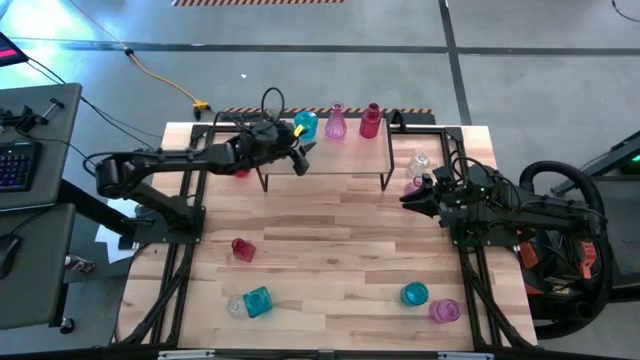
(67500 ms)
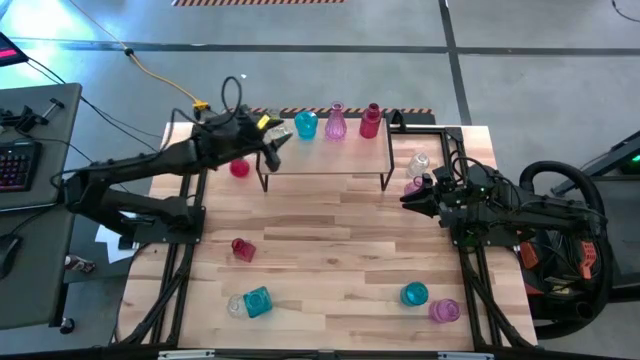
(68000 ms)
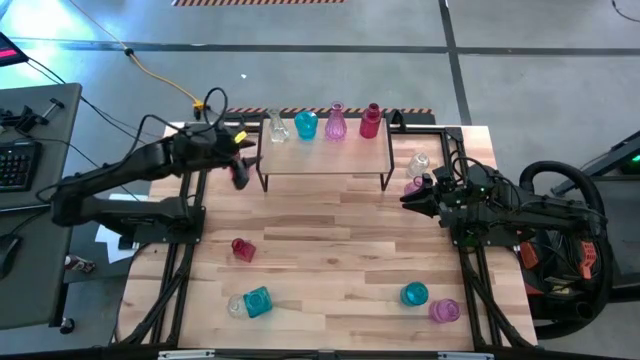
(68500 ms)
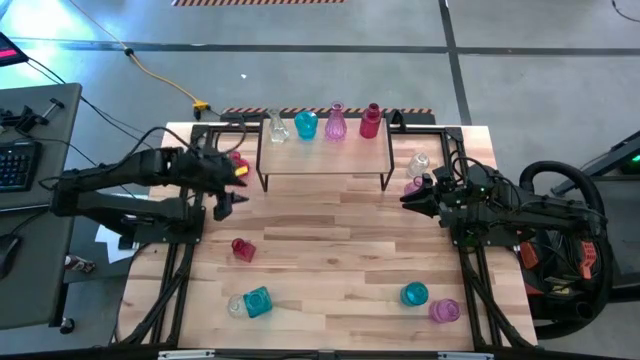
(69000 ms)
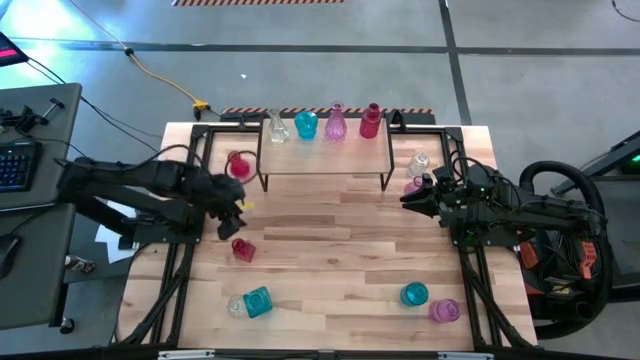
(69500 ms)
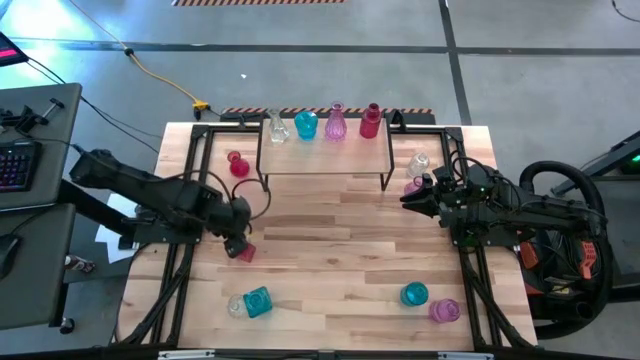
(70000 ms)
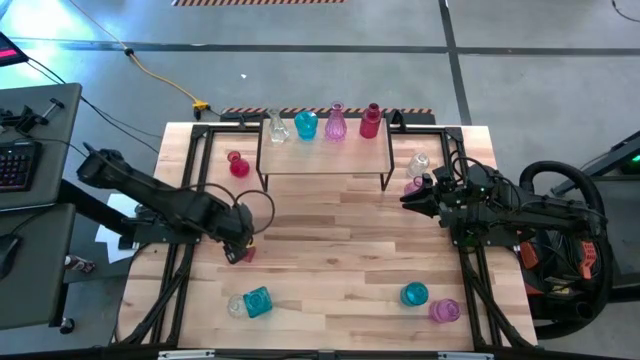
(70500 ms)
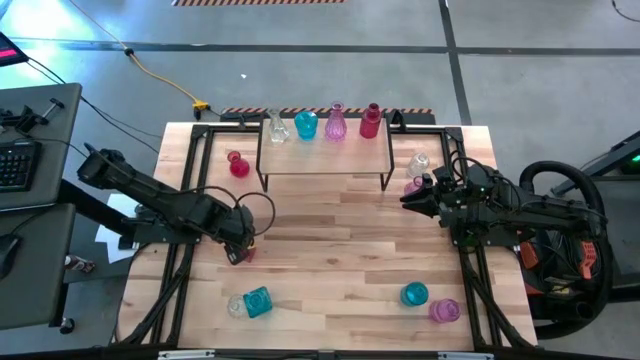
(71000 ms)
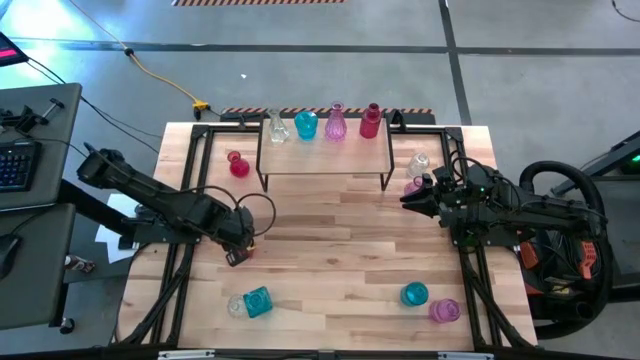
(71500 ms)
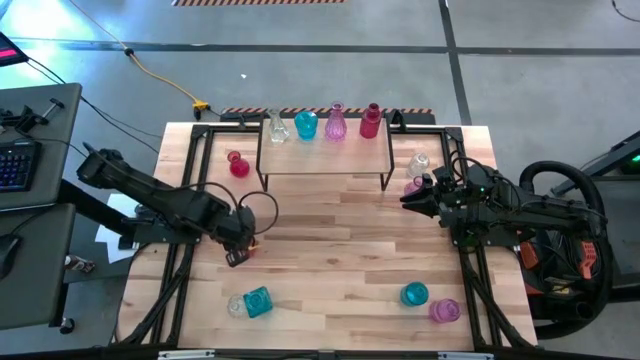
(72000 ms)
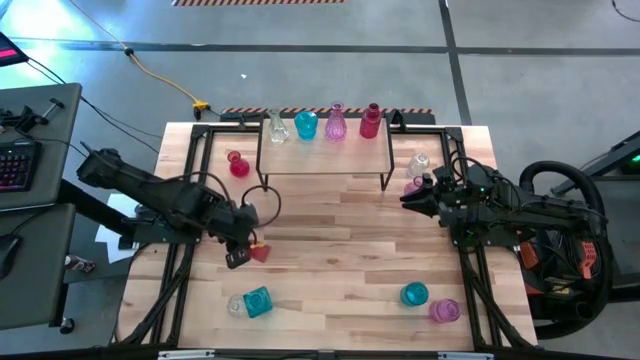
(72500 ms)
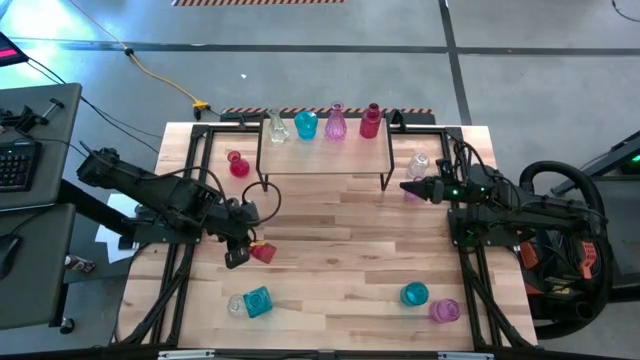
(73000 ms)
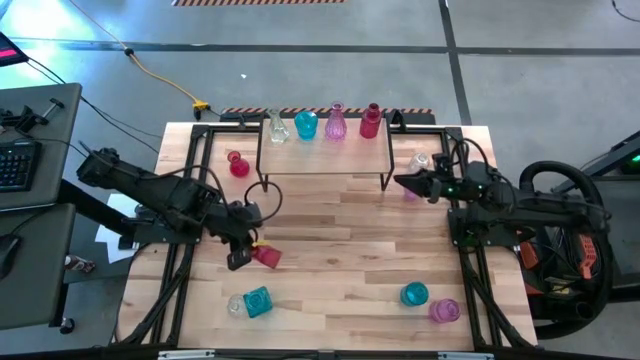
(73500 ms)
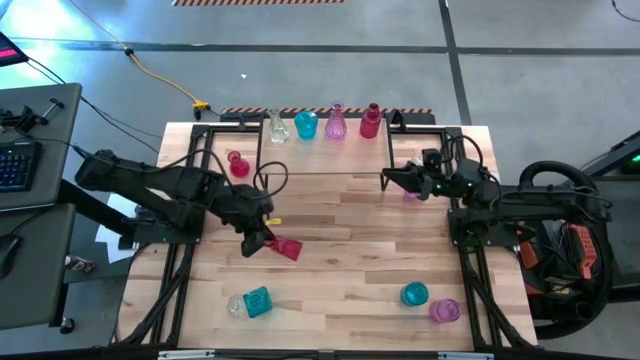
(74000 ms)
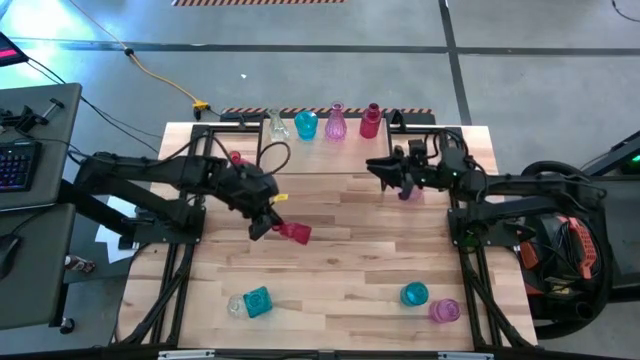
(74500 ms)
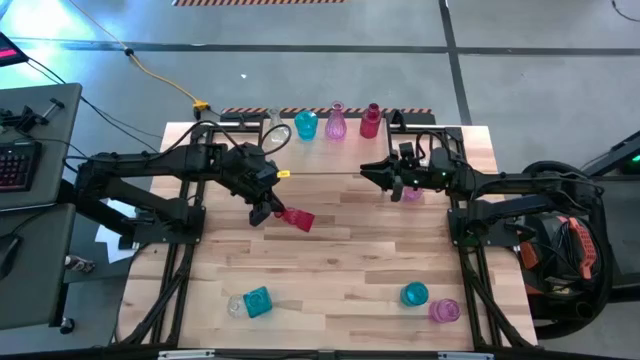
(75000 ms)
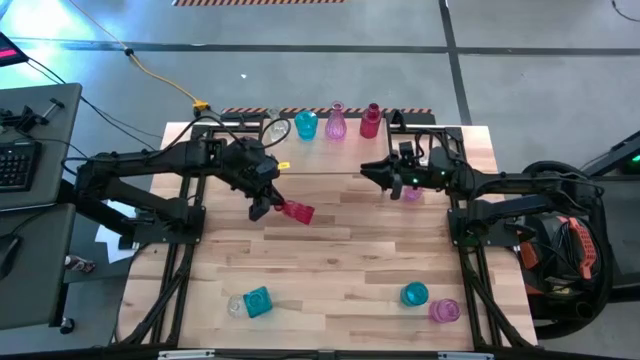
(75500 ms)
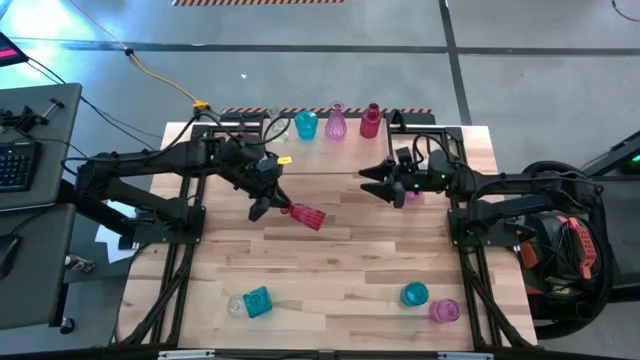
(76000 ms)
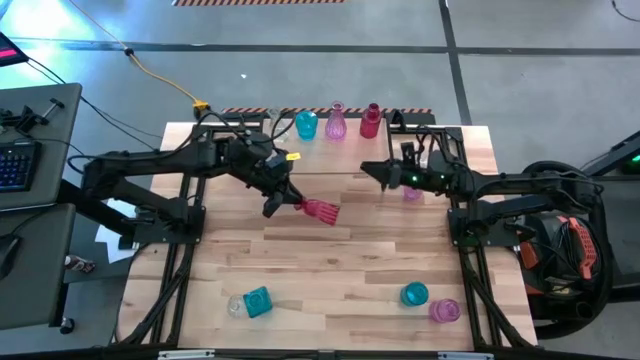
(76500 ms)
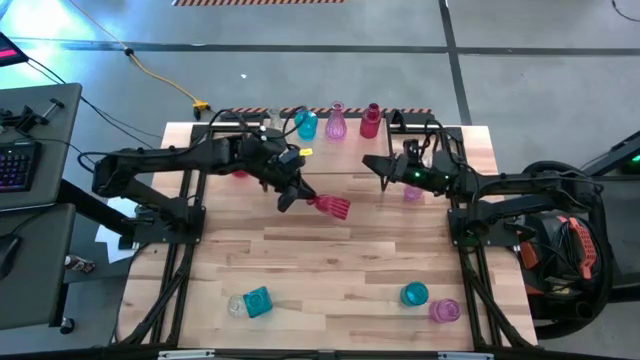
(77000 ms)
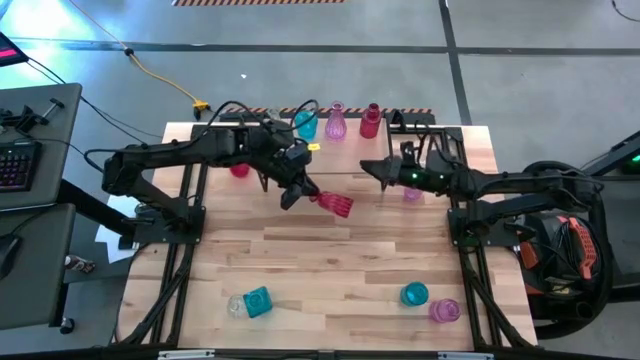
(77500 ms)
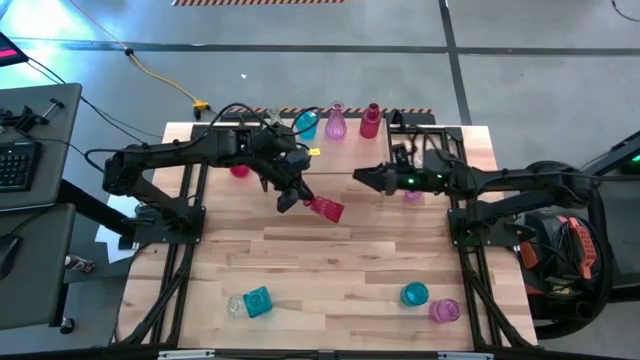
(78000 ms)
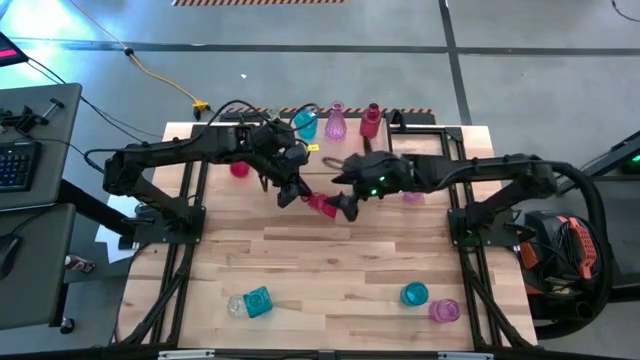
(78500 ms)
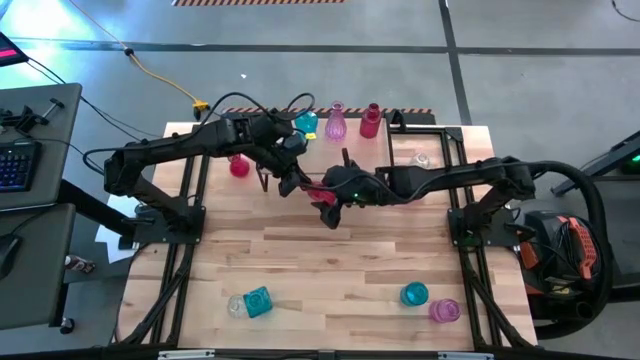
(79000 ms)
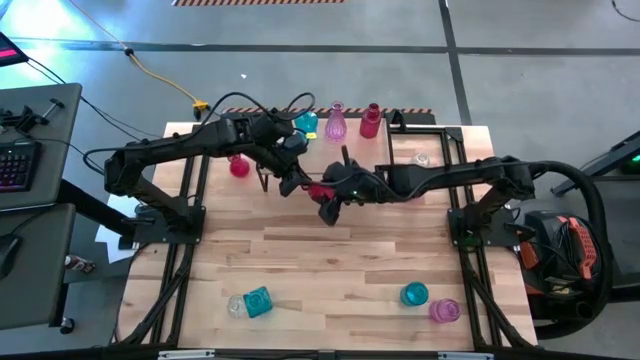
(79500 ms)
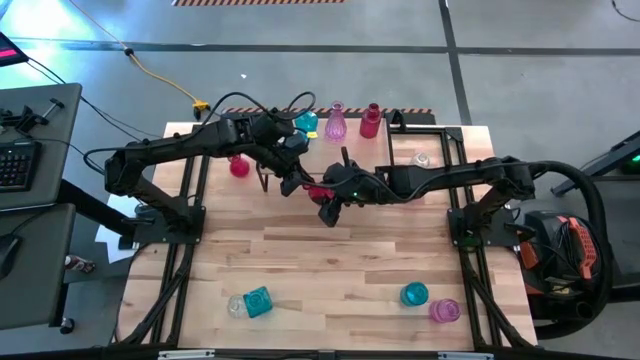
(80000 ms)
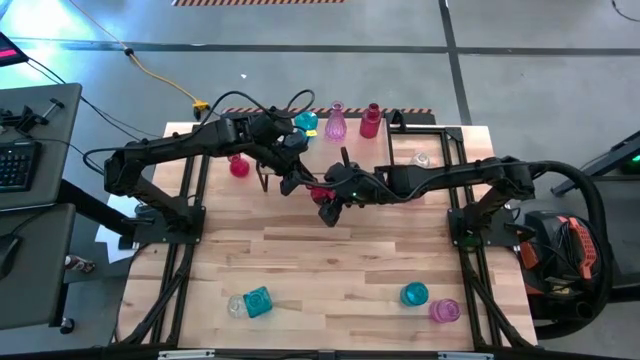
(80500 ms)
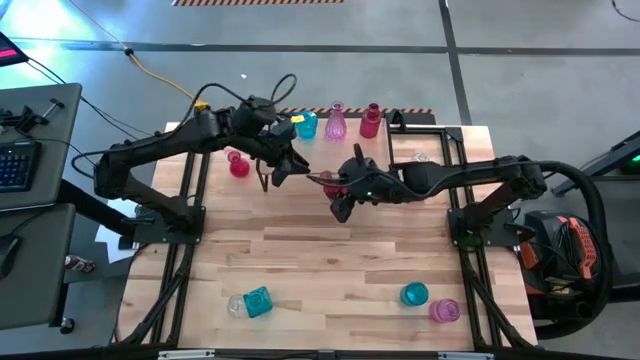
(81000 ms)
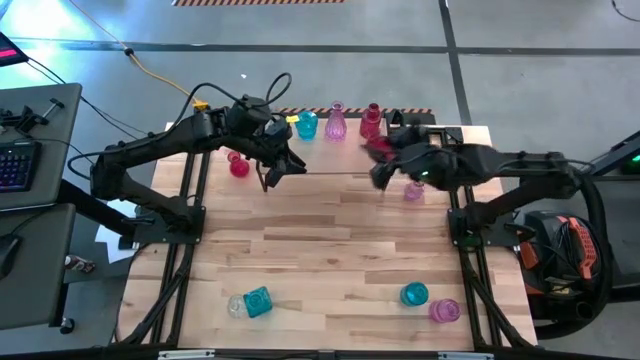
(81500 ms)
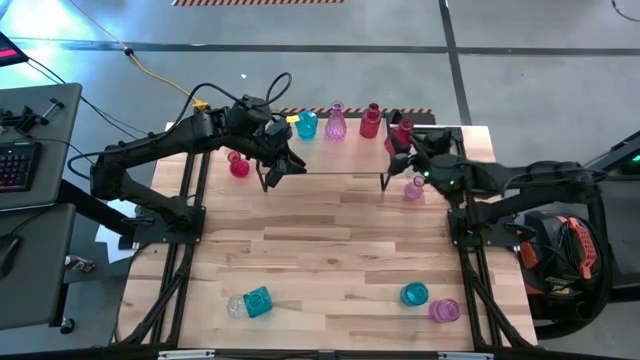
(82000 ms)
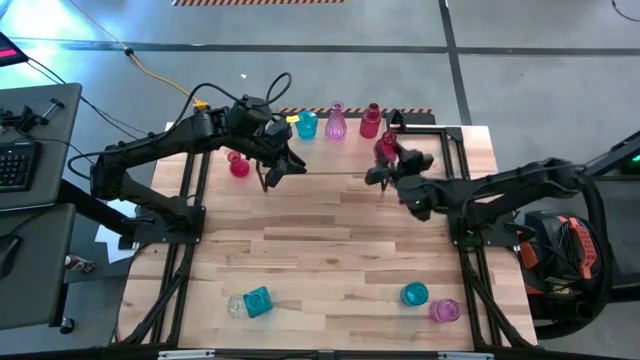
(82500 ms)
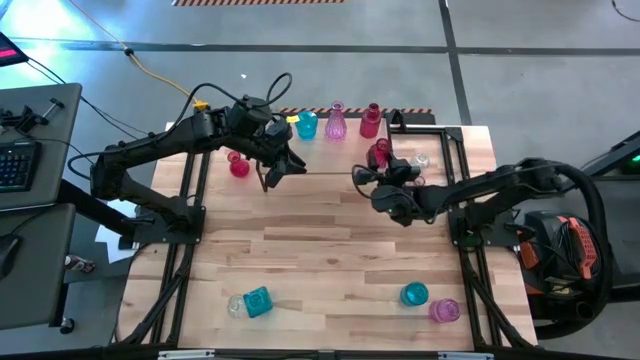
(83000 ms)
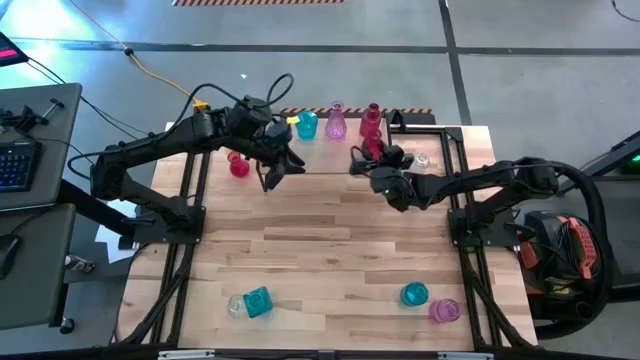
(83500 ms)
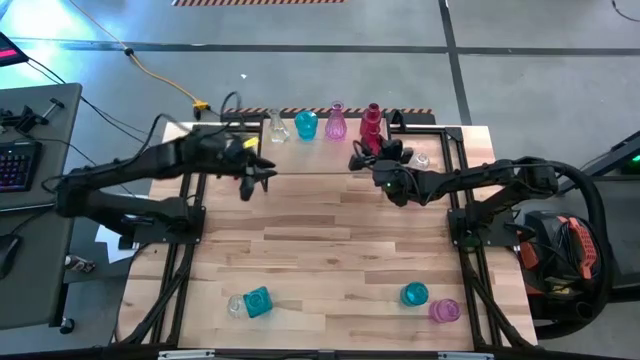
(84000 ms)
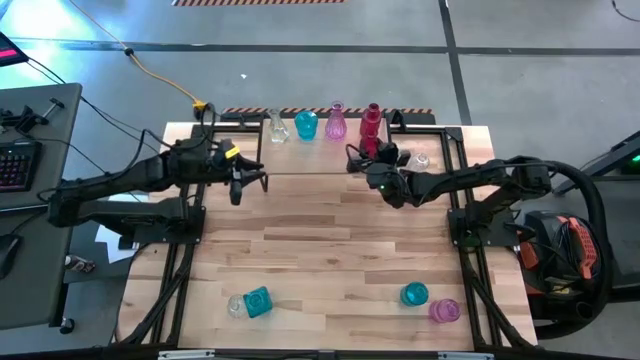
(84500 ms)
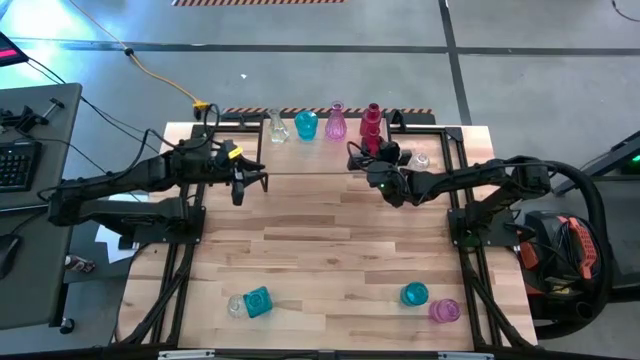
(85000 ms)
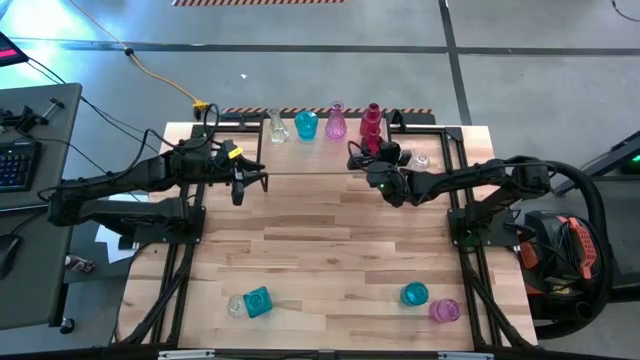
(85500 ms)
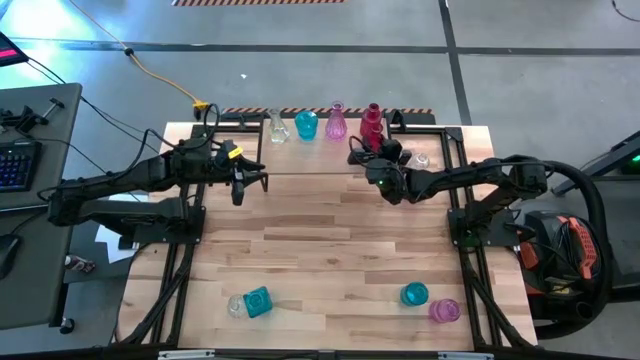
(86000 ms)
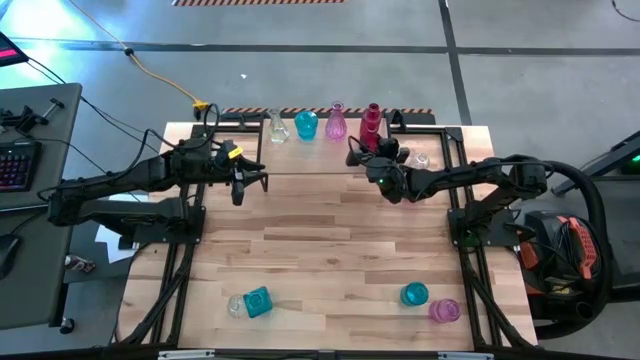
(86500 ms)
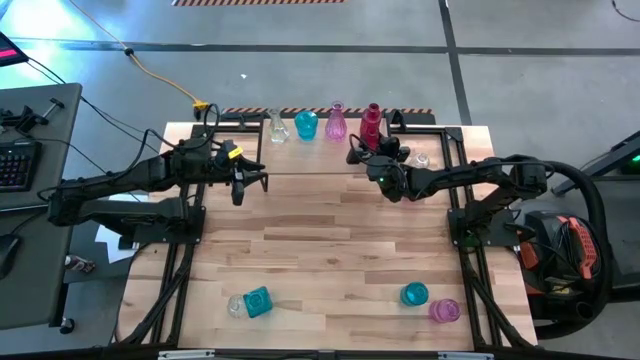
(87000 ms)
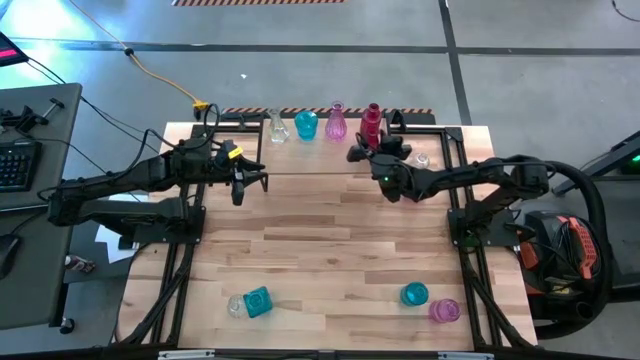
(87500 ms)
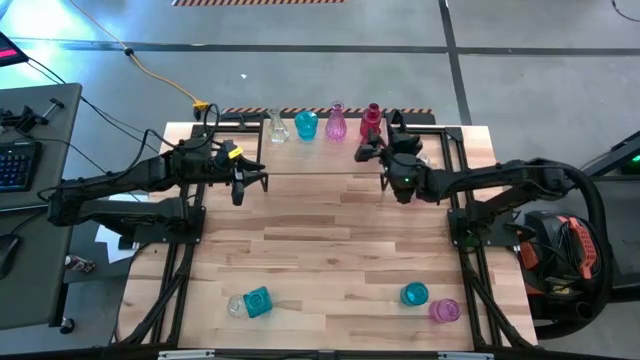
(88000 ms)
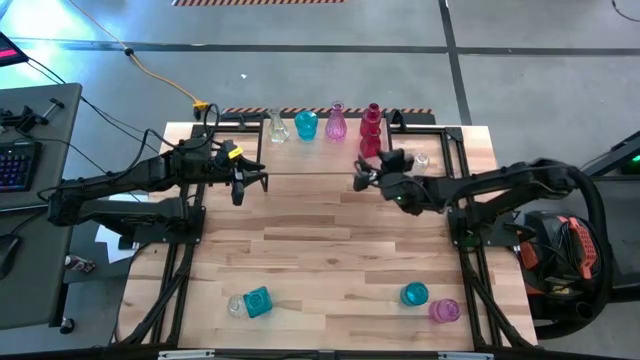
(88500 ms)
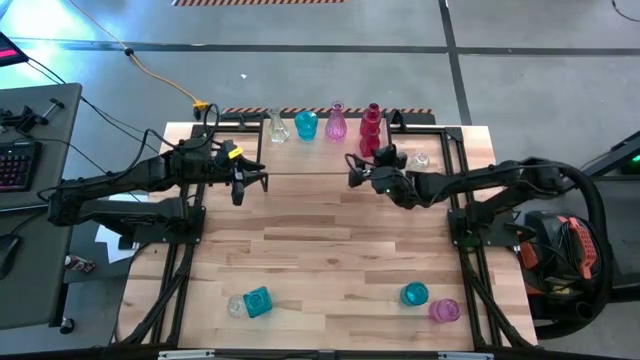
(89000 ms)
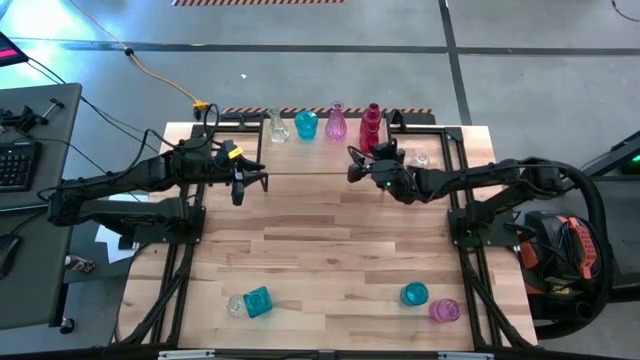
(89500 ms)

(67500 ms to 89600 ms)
Task: sort vases onto shelf
Put the bottom red flower vase on the shelf aligned with the other red flower vase
